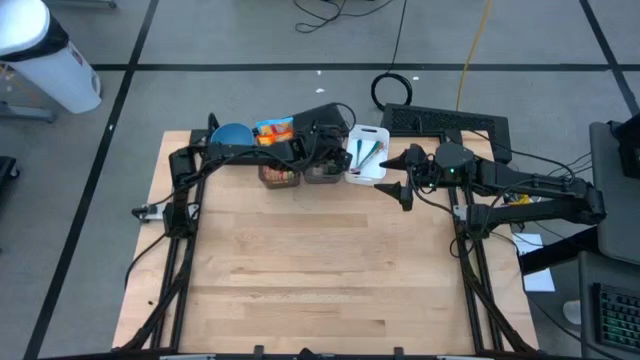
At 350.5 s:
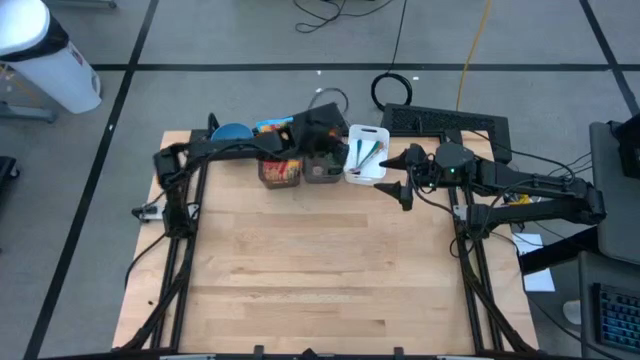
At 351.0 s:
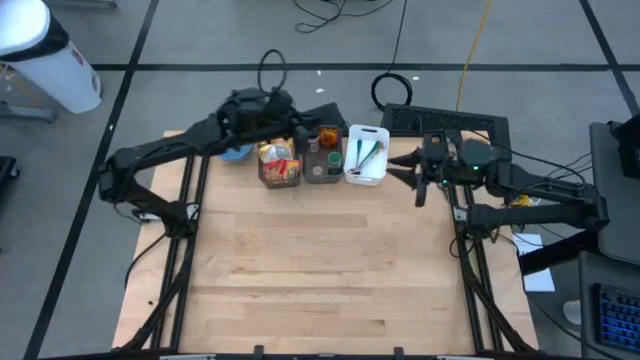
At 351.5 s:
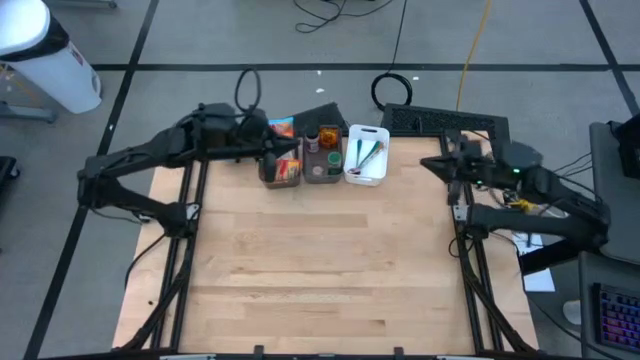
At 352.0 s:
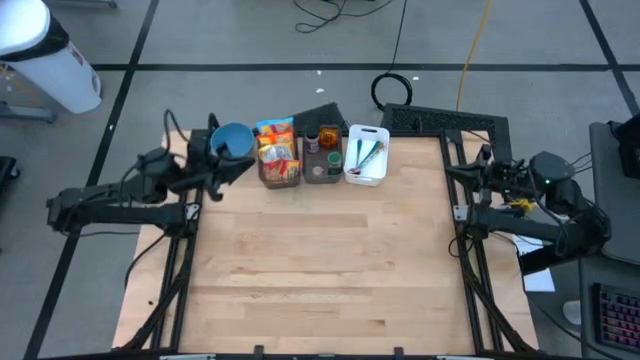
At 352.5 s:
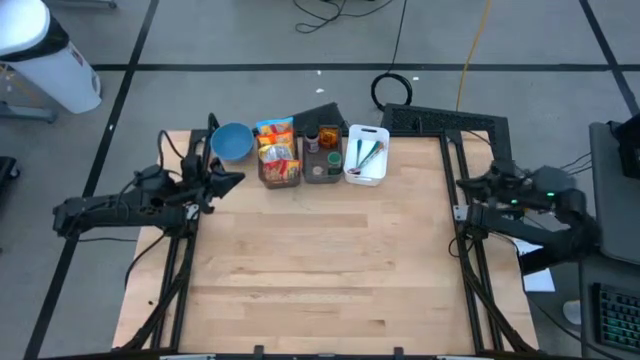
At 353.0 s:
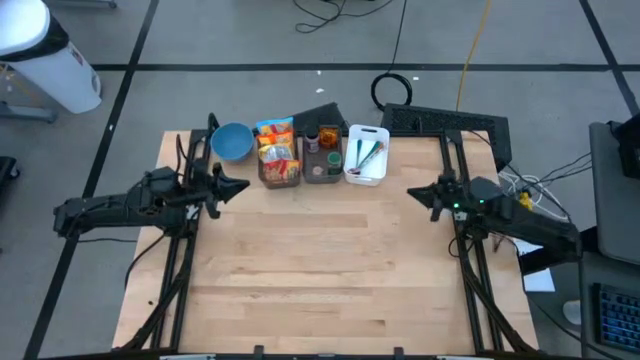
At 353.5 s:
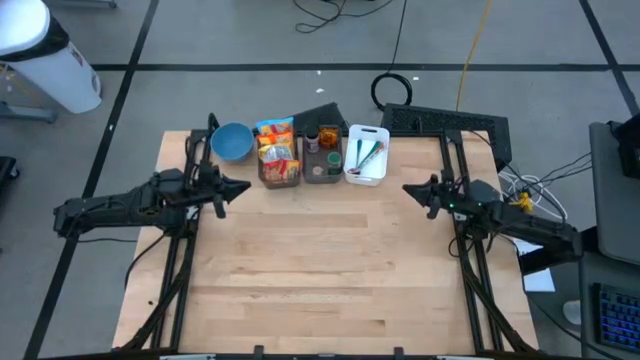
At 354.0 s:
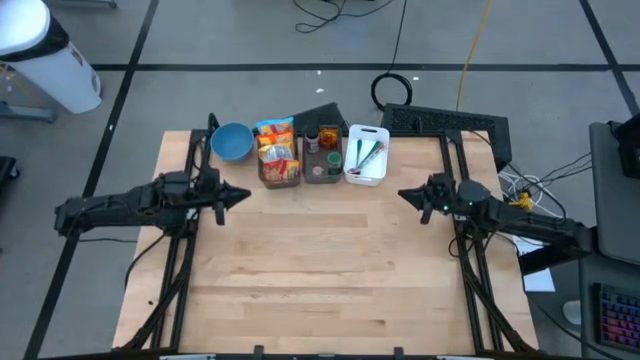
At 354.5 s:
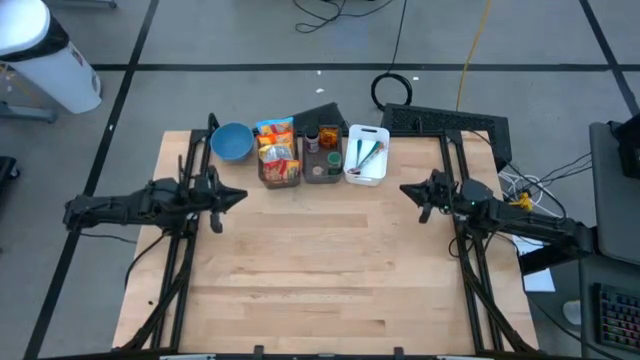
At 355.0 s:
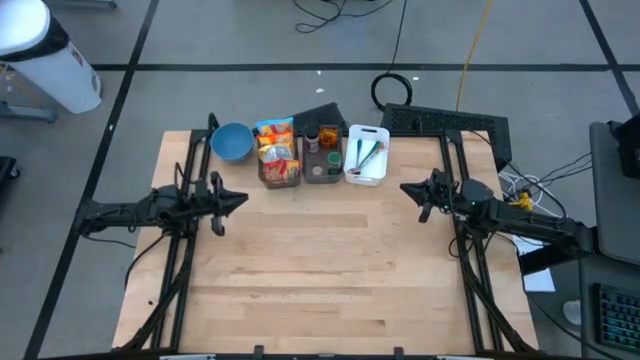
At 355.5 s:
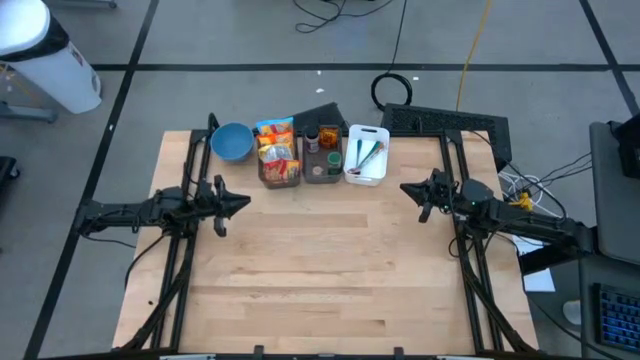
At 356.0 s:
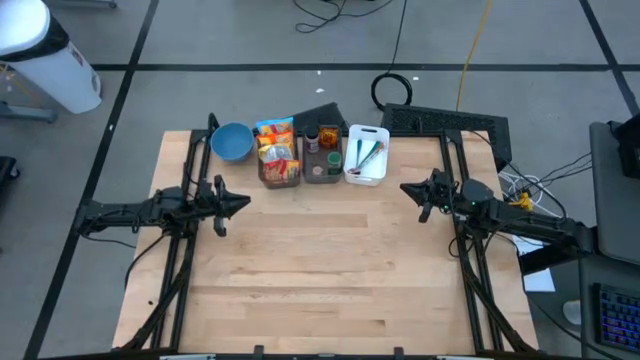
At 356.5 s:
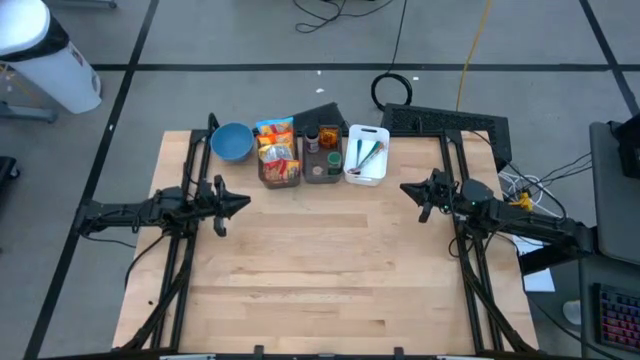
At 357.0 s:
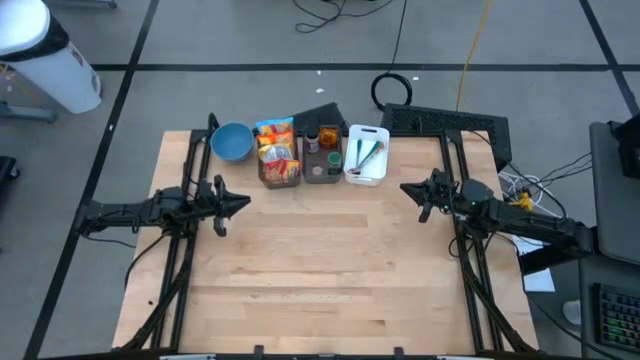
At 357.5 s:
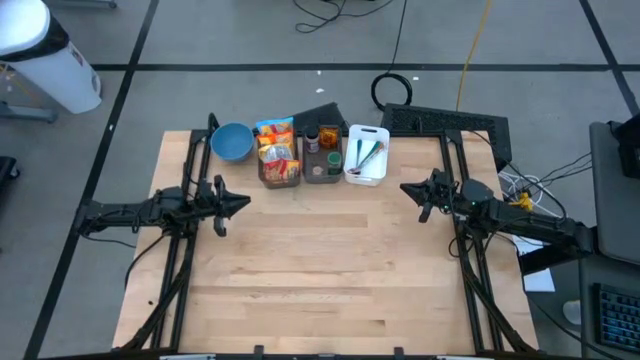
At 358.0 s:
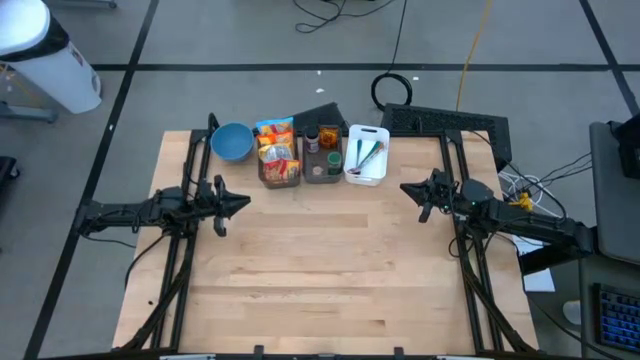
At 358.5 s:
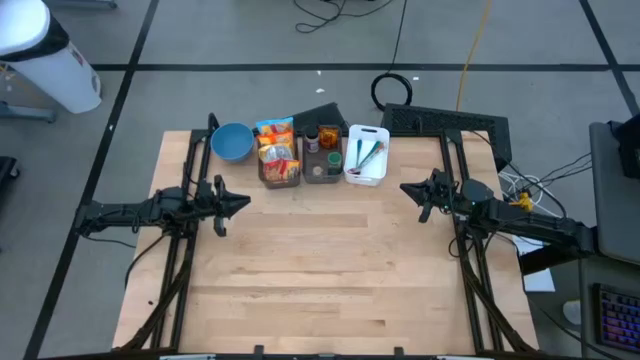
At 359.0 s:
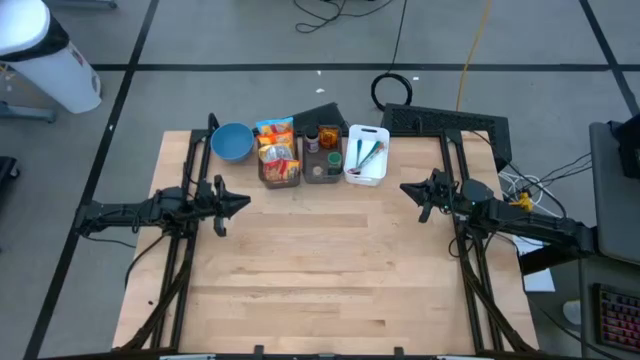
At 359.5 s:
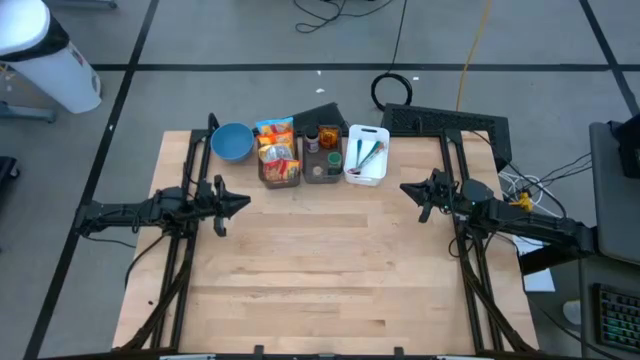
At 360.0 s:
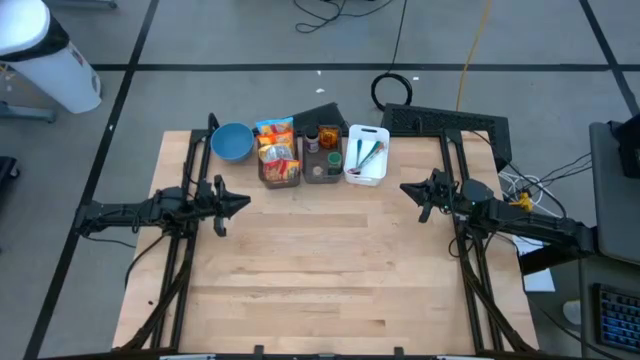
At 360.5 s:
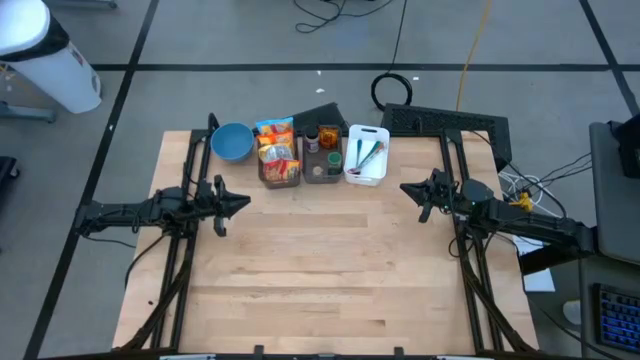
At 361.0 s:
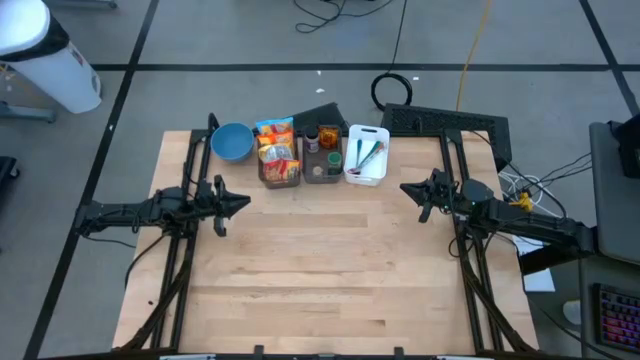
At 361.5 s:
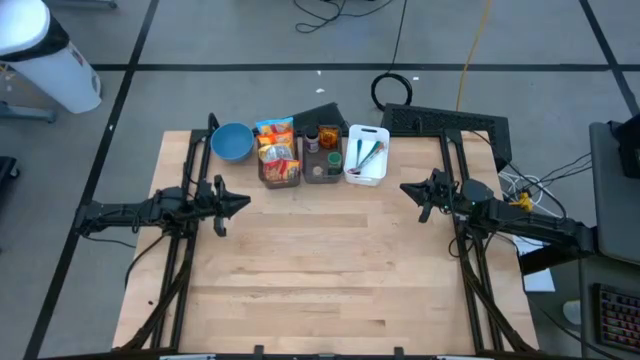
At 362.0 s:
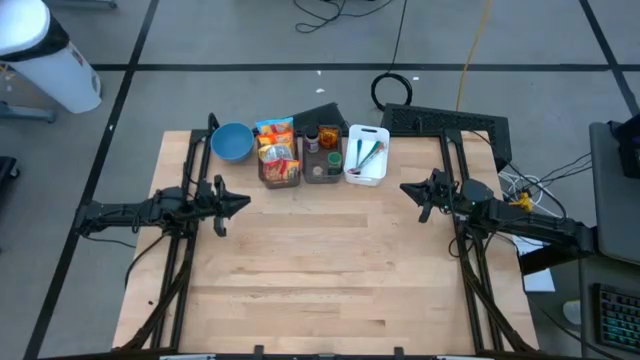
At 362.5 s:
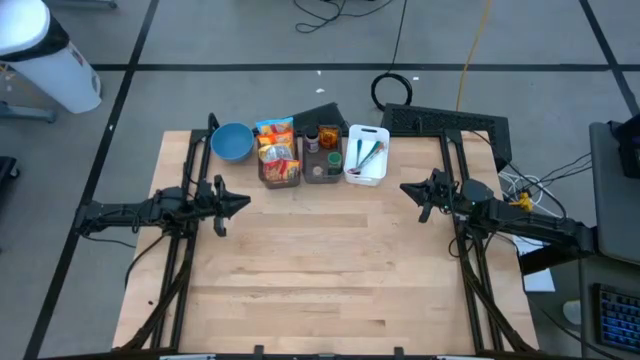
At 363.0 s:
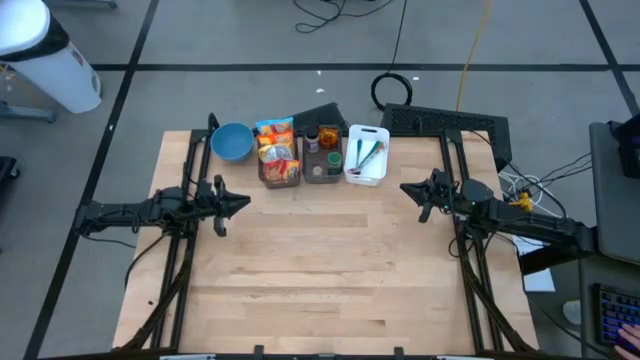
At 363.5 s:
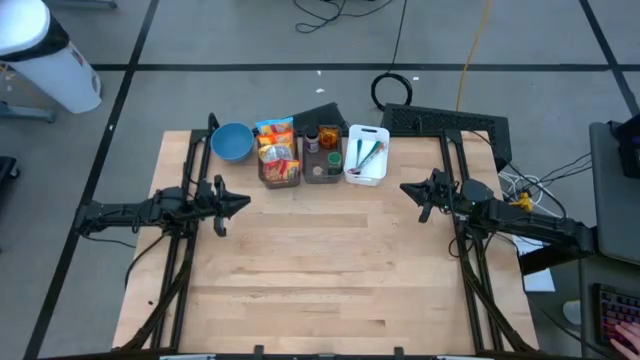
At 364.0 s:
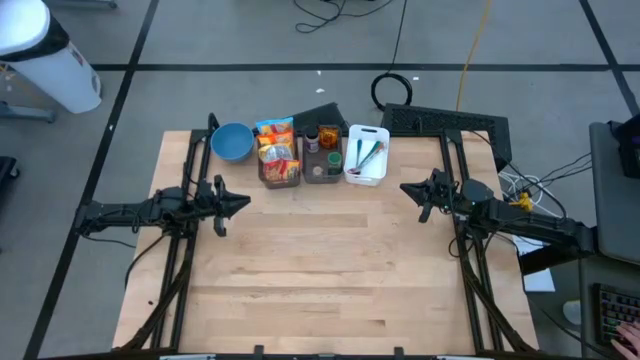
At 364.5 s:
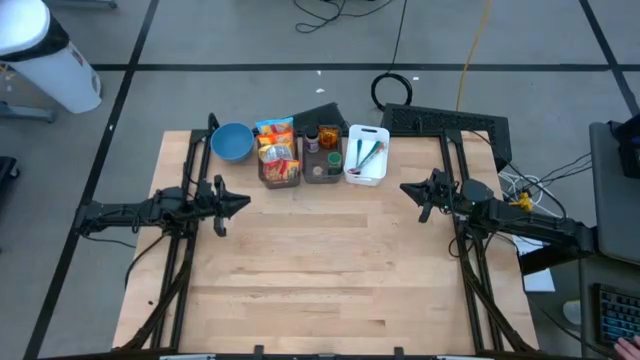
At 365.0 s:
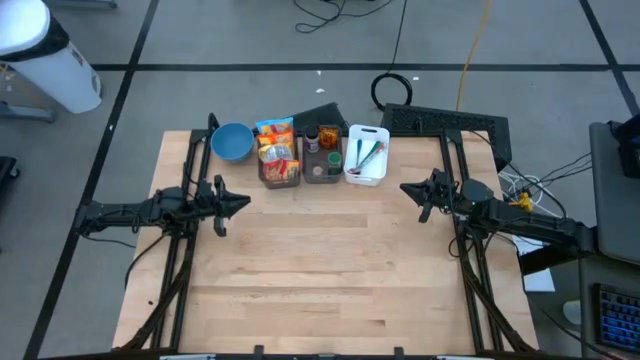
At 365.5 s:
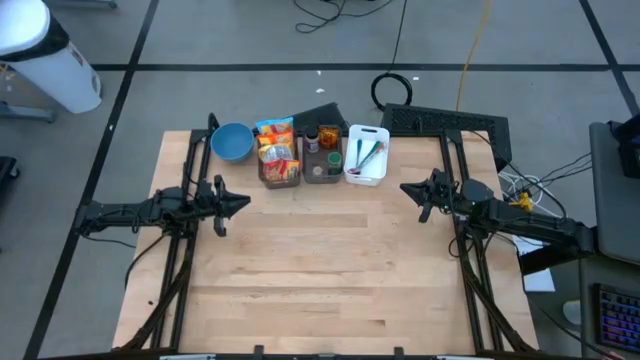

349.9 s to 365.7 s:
Task: Pick & Place Food Item
Return to Home Position

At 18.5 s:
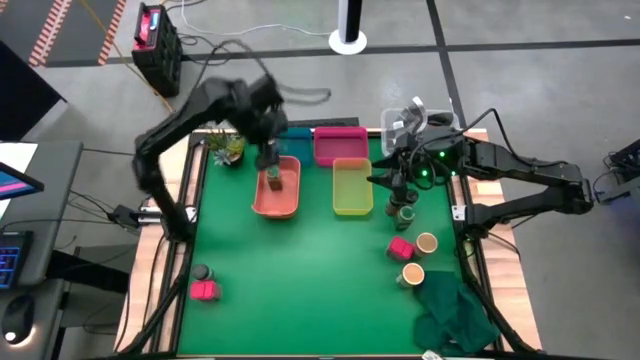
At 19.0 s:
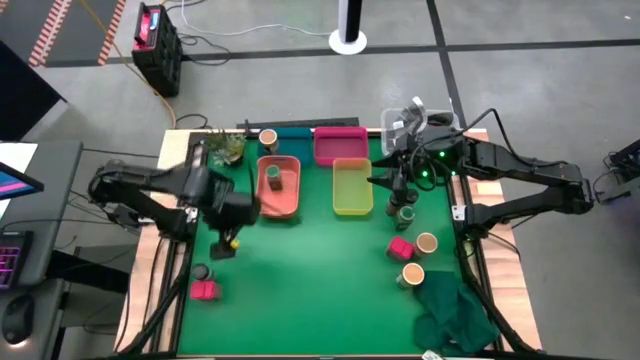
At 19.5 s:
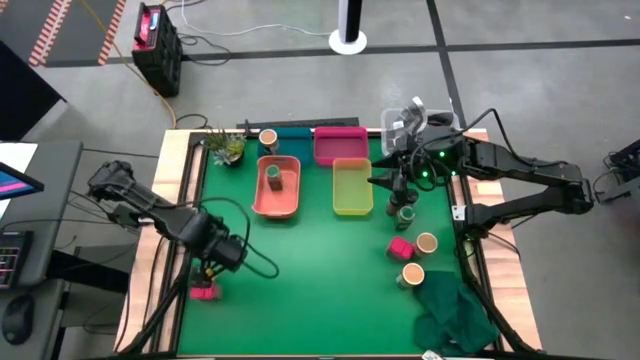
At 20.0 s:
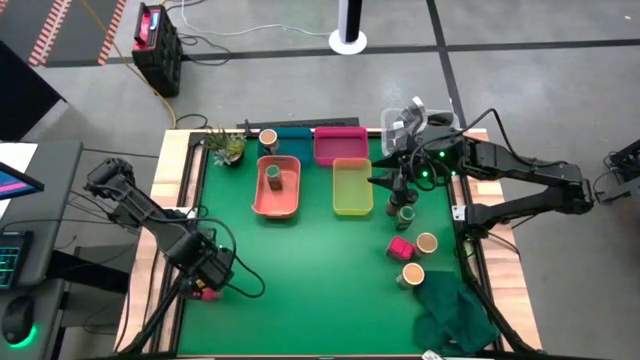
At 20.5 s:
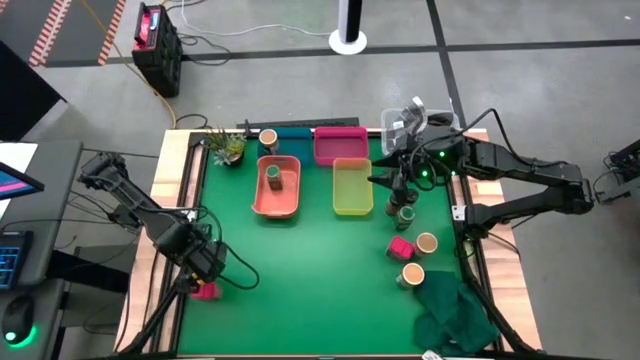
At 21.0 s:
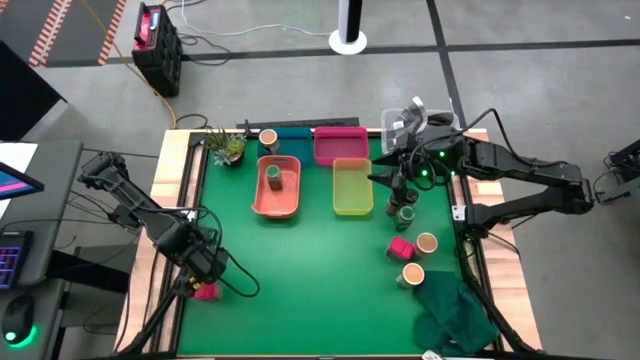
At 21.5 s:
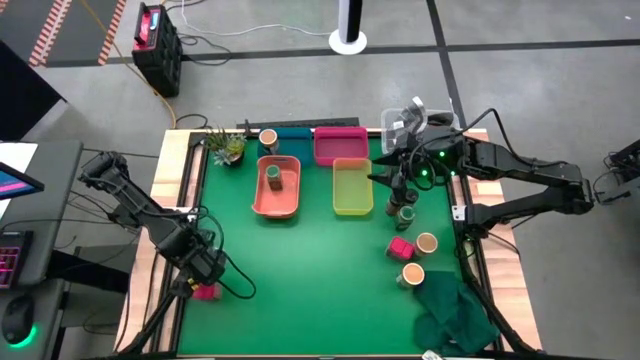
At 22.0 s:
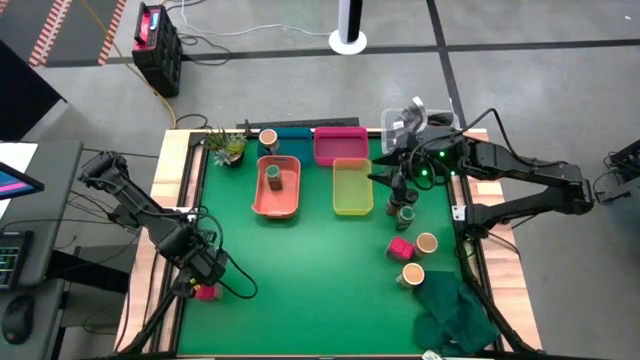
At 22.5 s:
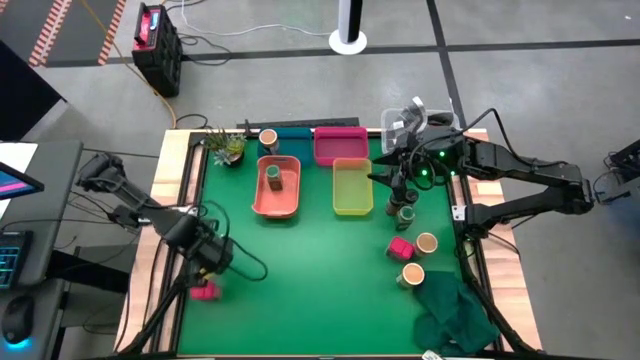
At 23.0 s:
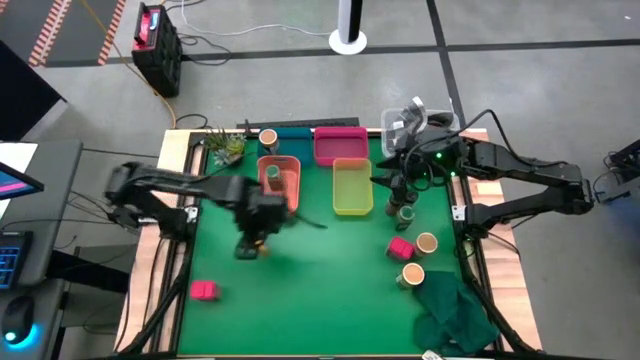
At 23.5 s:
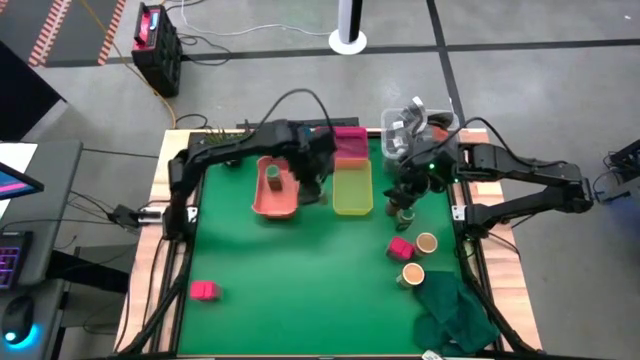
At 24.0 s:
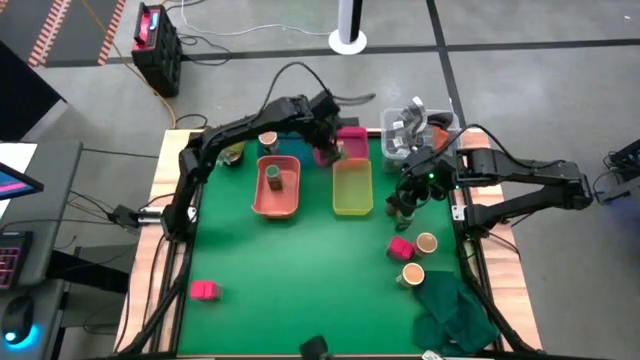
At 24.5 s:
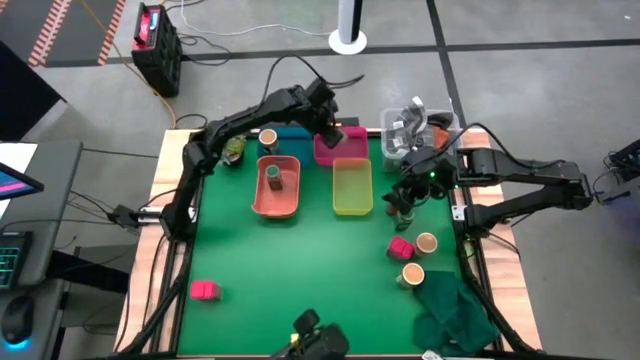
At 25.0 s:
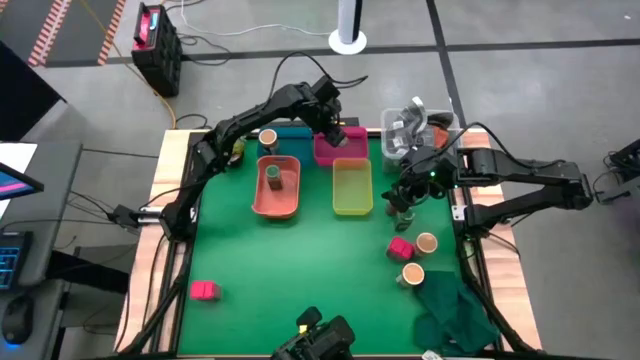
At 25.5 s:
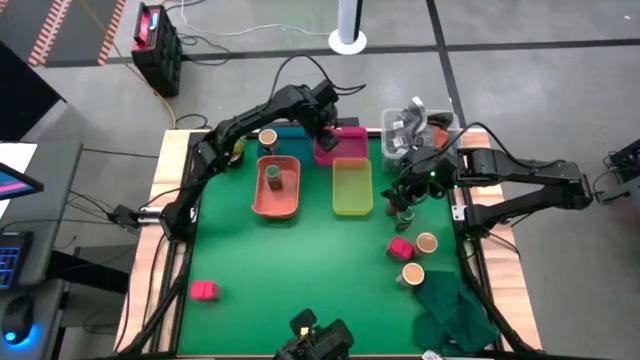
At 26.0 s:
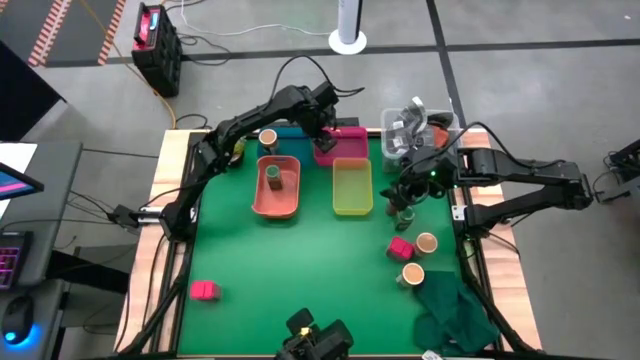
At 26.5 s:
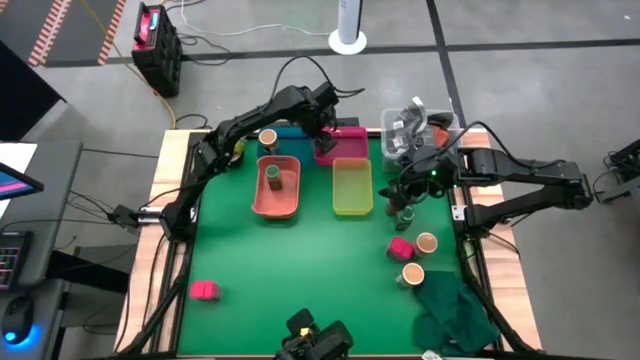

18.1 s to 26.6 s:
Task: Sort spices by type
Put the bottom left black seasoning bottle into the red bin
